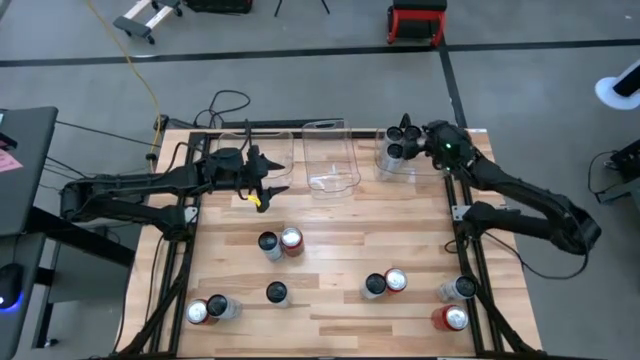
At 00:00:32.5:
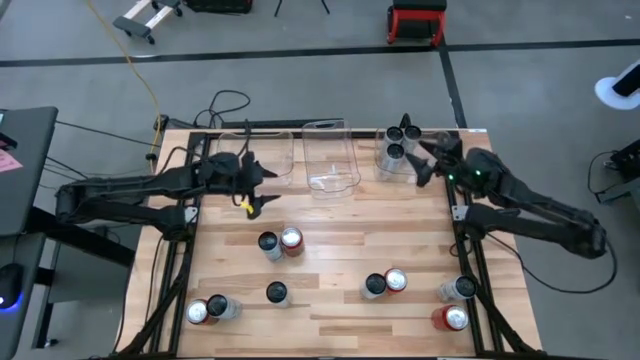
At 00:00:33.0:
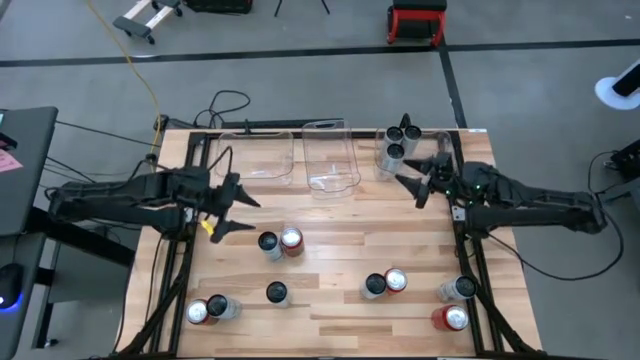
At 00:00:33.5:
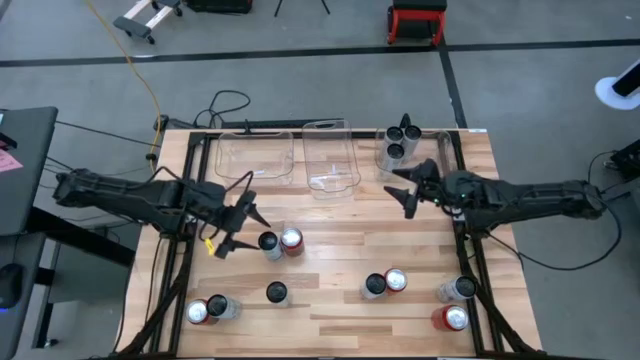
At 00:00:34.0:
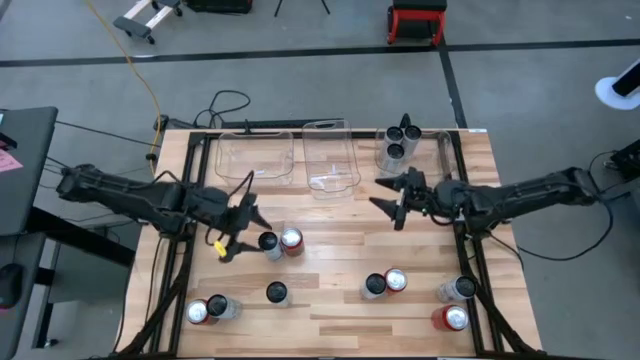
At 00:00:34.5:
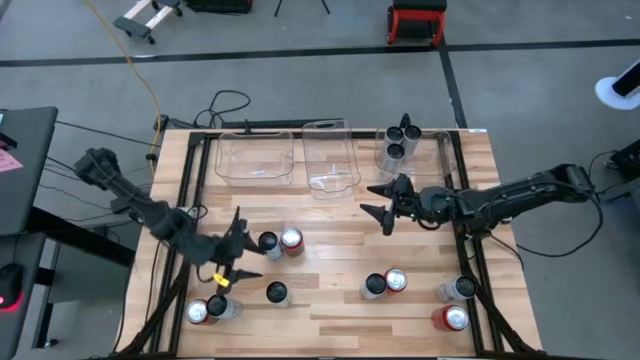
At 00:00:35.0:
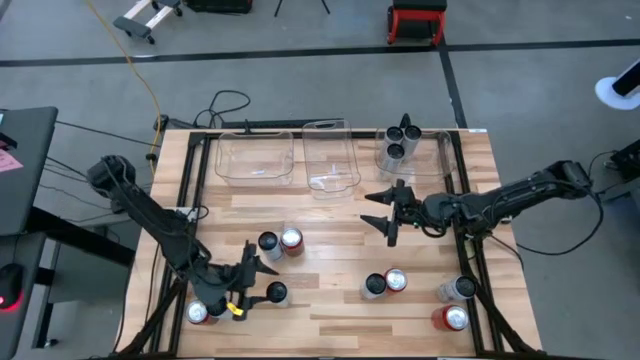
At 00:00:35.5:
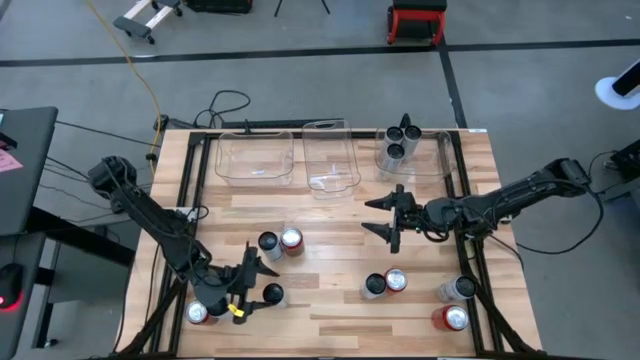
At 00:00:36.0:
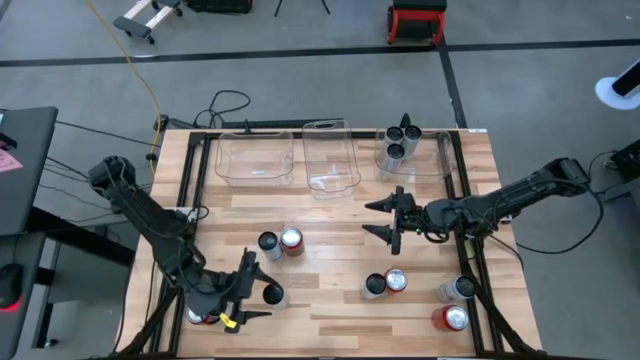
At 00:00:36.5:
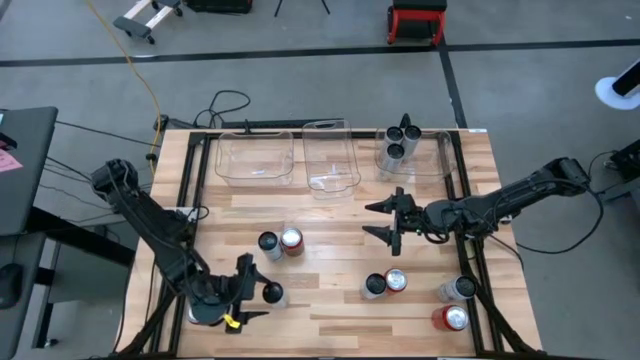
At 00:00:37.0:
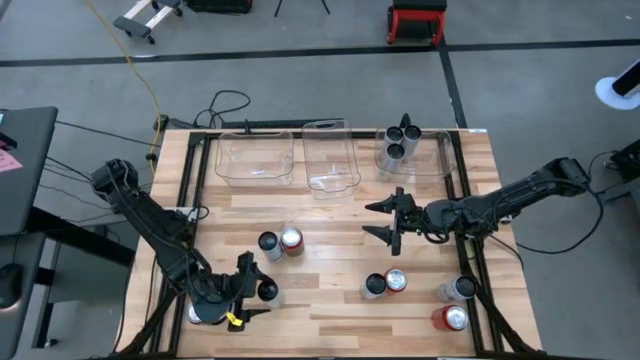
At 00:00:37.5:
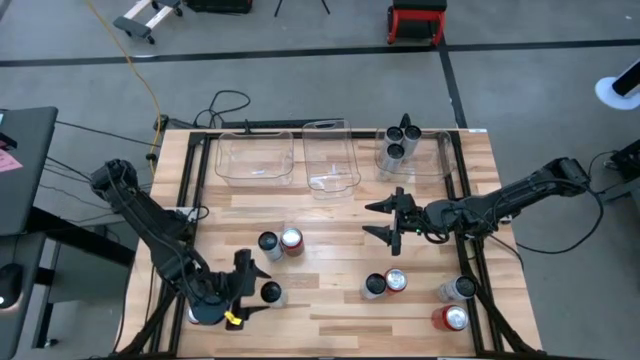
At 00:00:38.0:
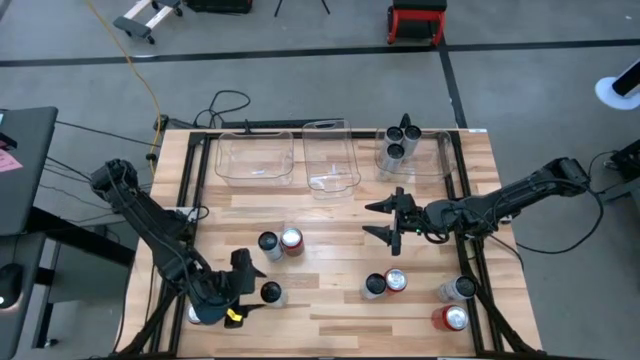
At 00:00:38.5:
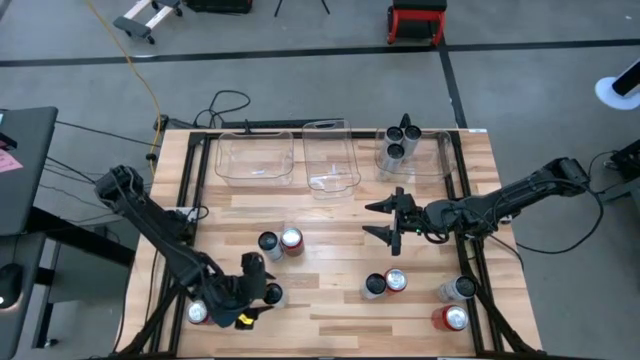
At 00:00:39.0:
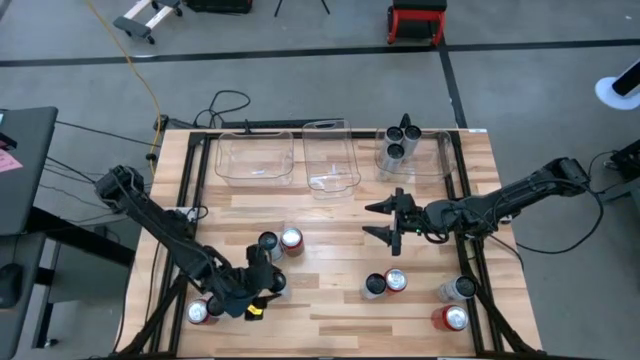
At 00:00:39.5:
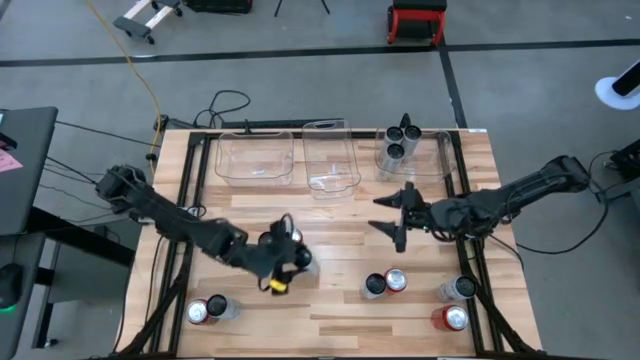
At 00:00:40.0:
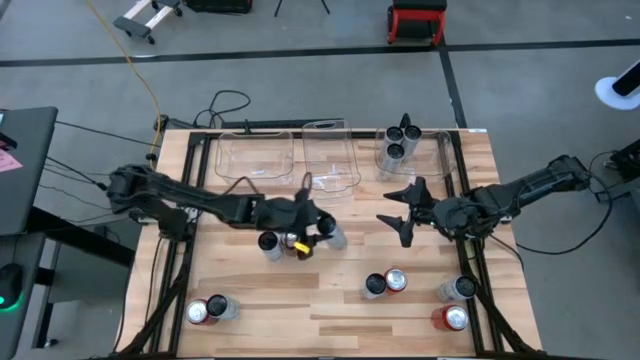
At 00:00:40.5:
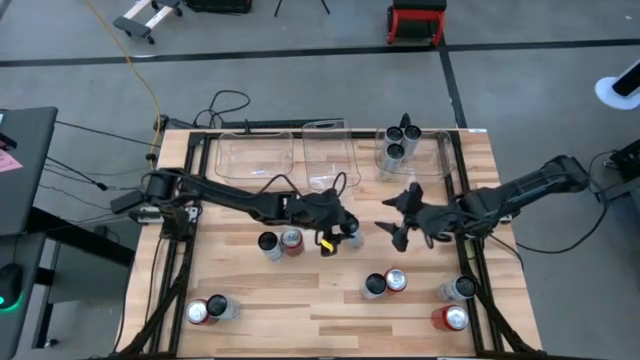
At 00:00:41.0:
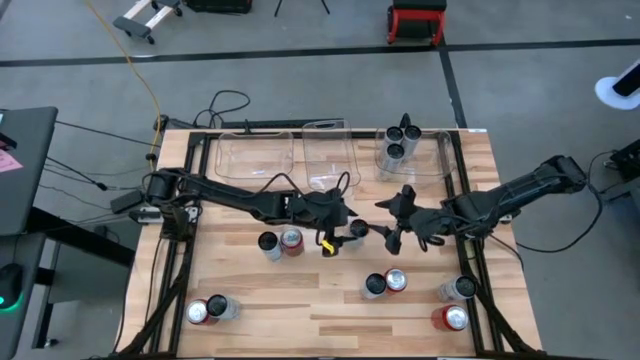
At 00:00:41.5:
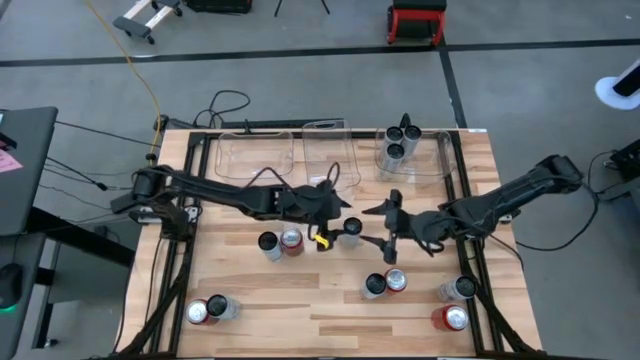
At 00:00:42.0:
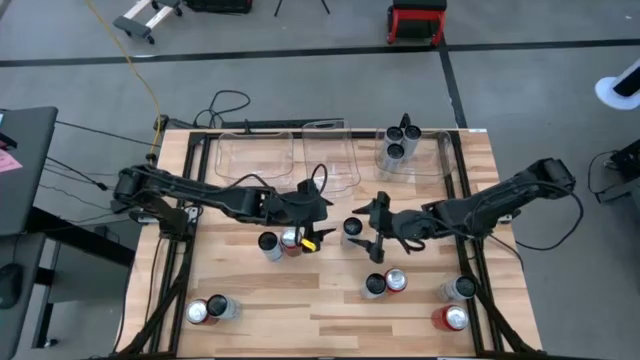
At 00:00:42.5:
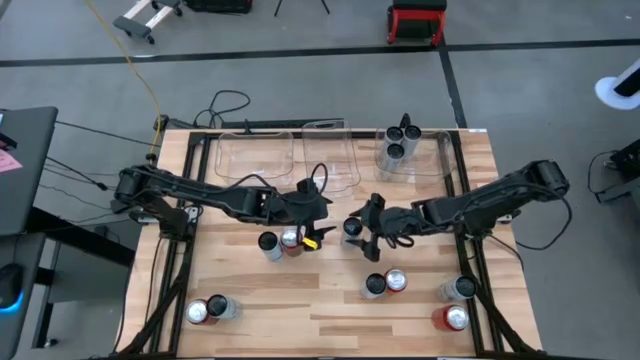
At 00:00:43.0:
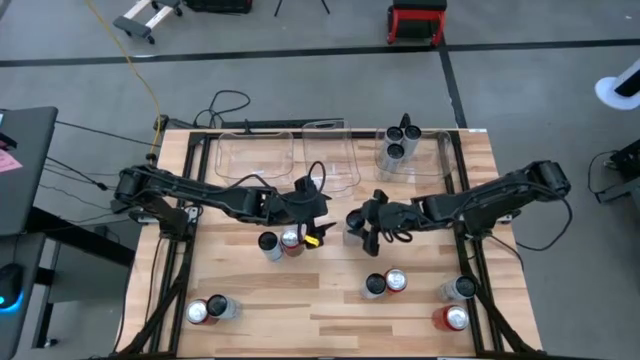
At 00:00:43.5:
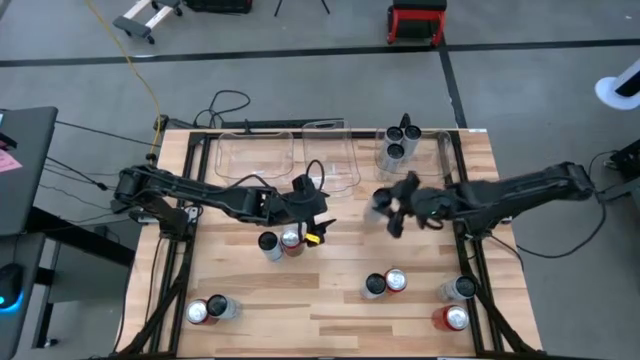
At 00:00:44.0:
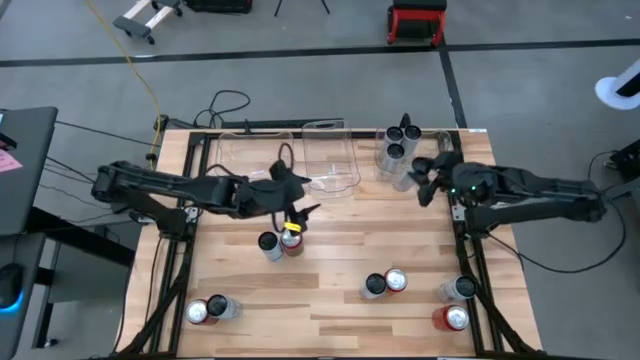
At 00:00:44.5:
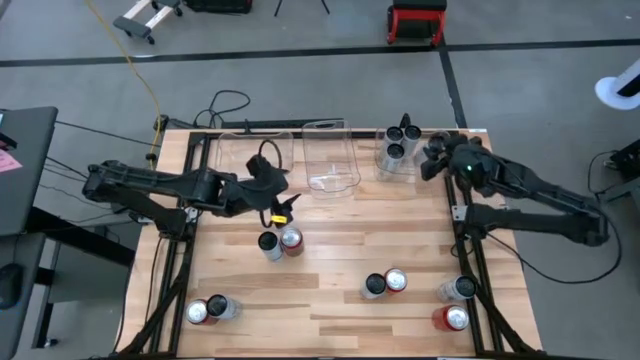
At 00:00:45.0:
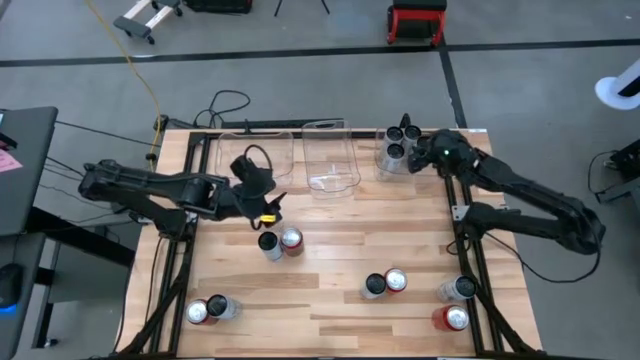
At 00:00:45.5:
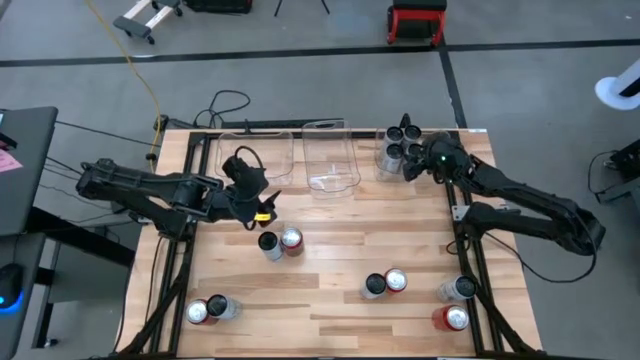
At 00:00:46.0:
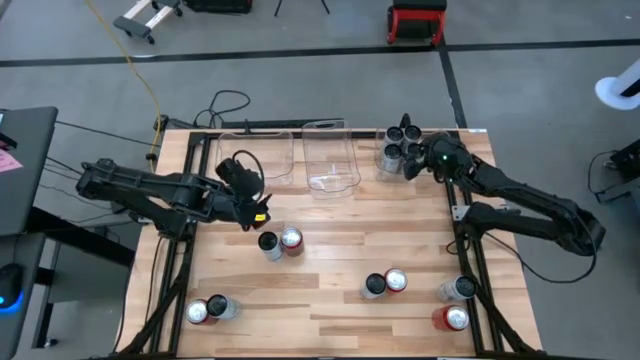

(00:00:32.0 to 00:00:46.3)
Task: Sort soda cans
Put the white-yellow soda can into the right transparent bin
